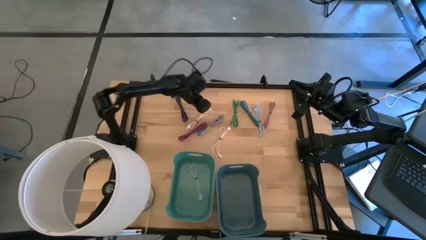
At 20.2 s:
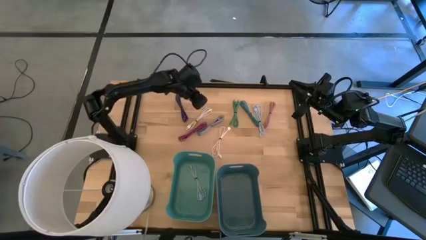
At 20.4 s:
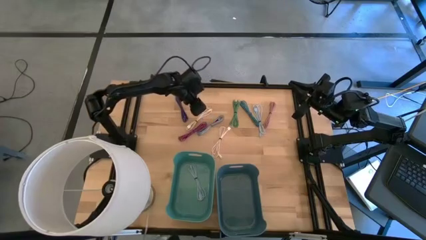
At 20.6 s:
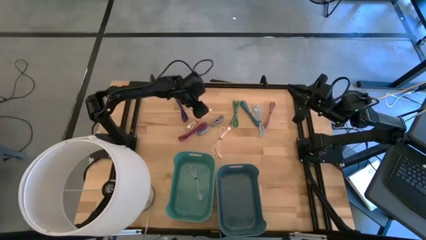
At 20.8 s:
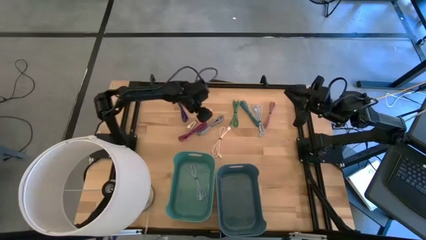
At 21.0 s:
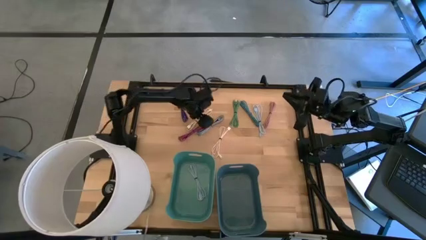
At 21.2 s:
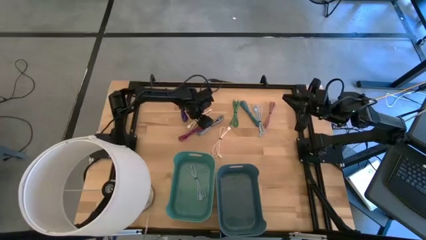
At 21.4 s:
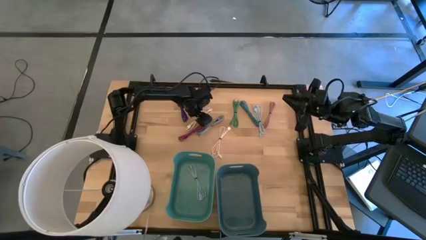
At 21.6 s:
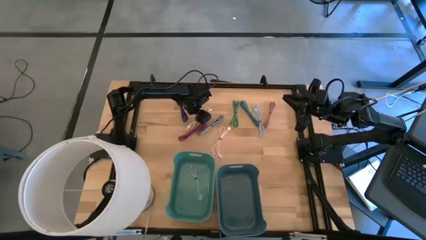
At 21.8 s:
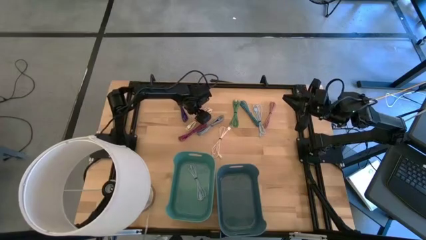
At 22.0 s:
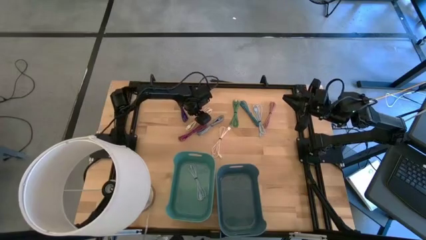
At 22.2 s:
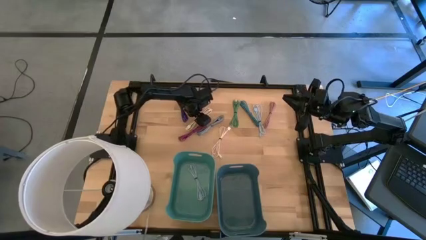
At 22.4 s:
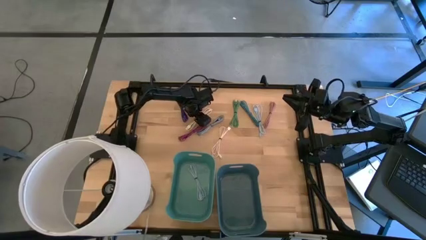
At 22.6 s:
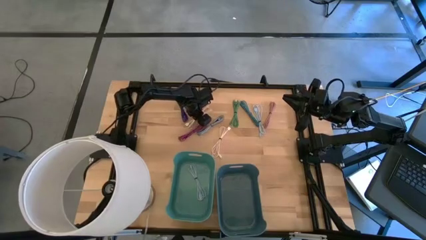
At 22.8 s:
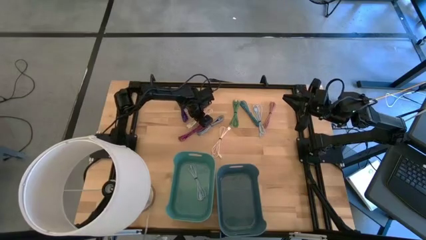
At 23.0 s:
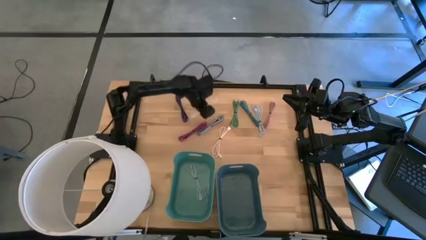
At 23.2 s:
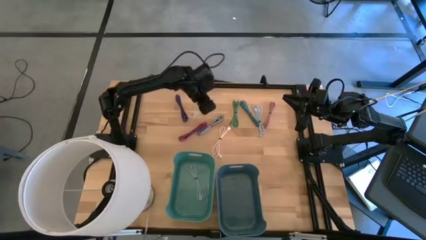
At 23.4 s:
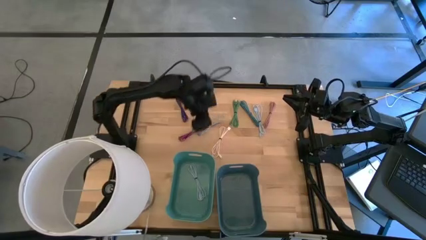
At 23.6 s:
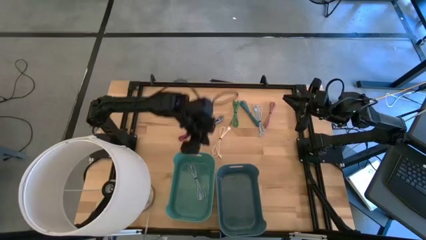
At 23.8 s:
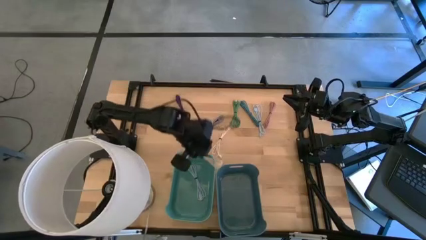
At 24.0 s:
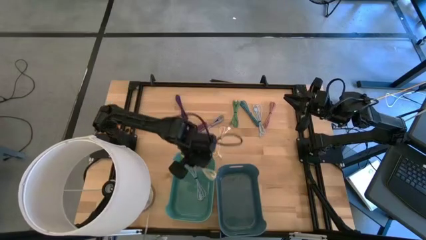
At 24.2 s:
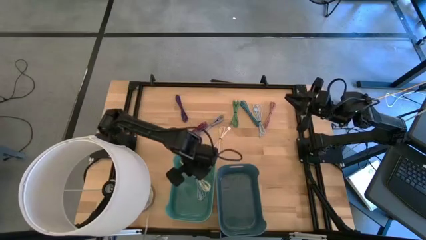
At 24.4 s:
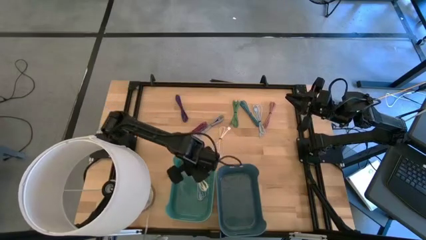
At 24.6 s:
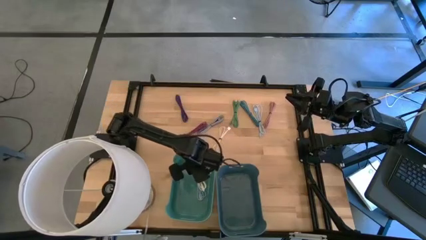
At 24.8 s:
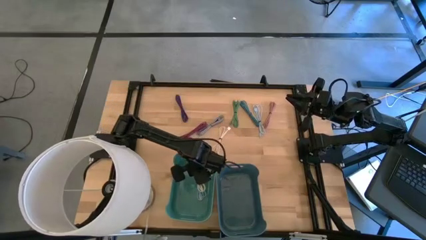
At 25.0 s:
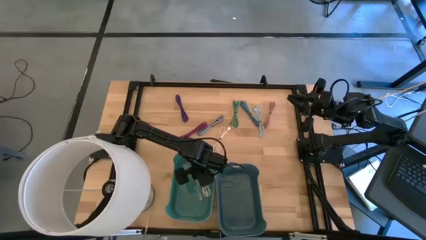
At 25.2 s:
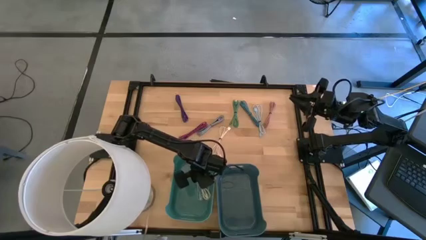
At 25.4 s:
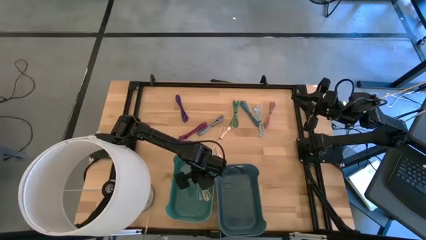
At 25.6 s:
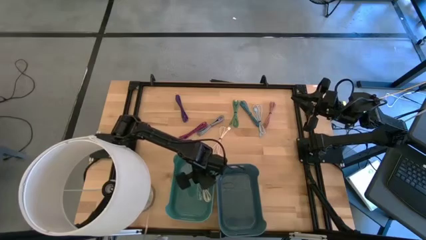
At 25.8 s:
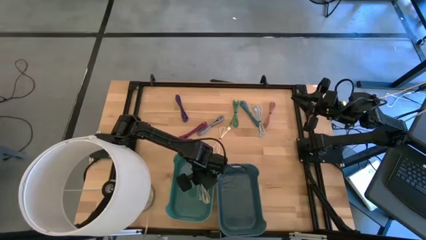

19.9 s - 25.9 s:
Put the left white charger cable into the green bin

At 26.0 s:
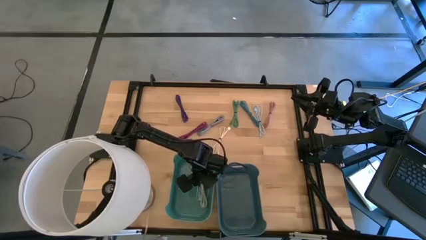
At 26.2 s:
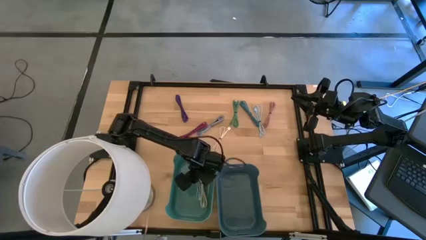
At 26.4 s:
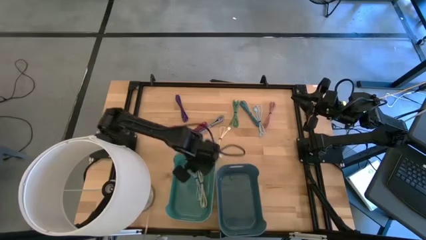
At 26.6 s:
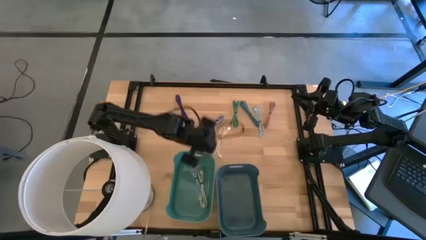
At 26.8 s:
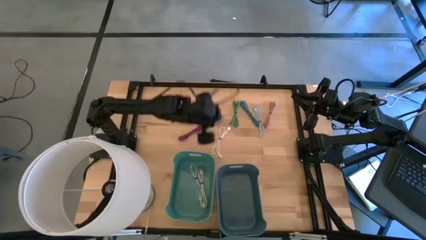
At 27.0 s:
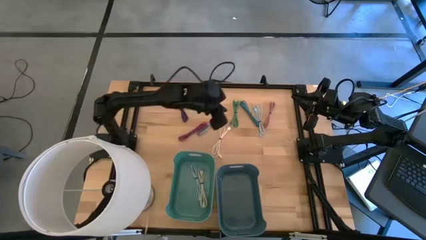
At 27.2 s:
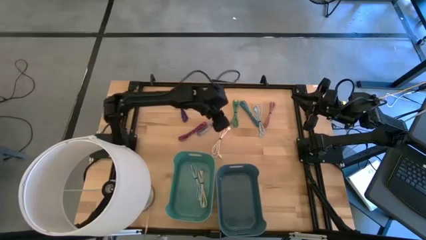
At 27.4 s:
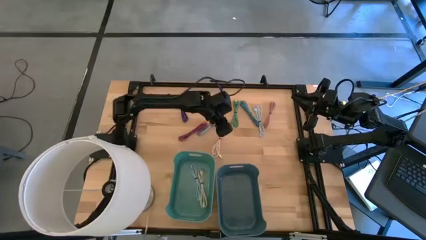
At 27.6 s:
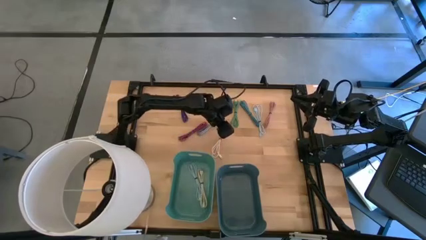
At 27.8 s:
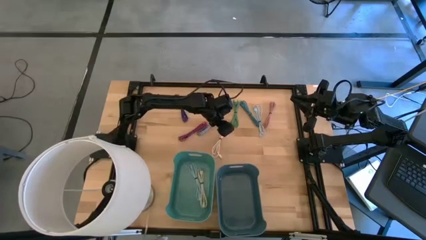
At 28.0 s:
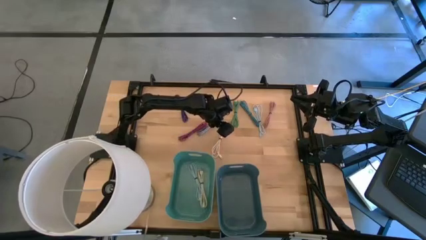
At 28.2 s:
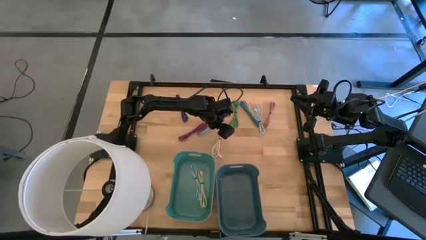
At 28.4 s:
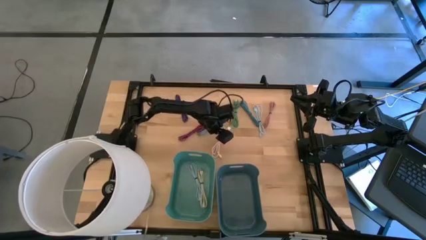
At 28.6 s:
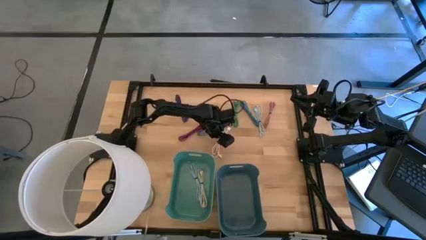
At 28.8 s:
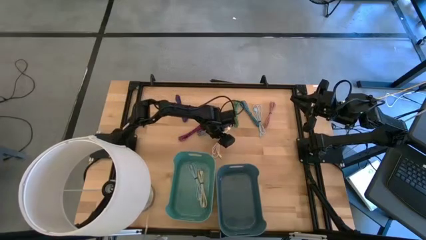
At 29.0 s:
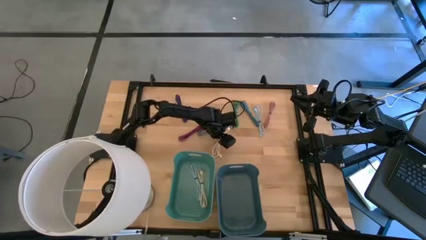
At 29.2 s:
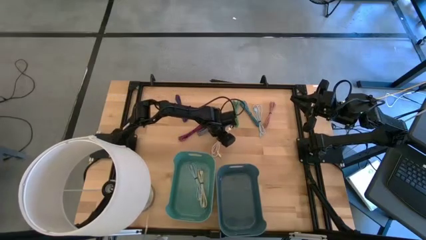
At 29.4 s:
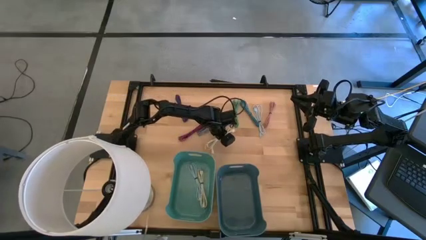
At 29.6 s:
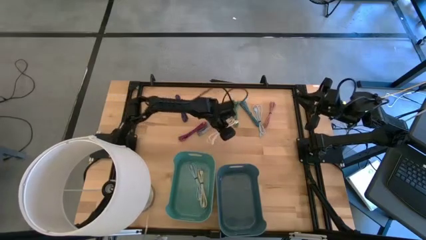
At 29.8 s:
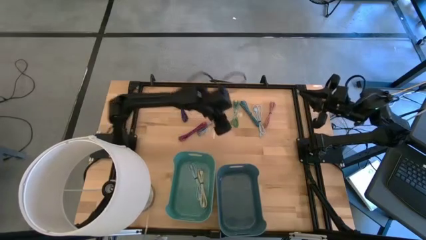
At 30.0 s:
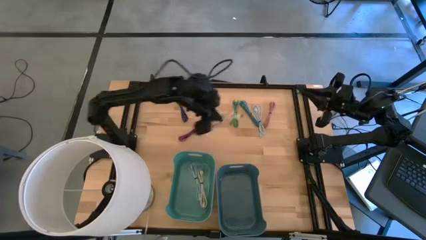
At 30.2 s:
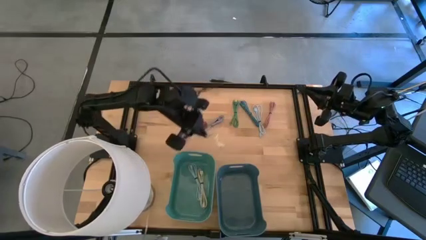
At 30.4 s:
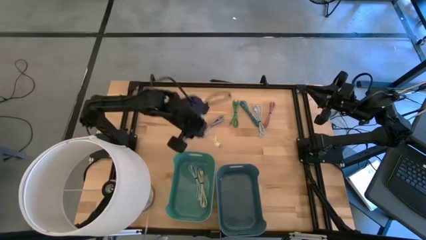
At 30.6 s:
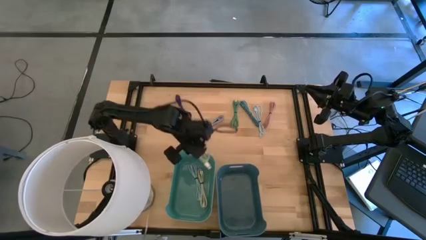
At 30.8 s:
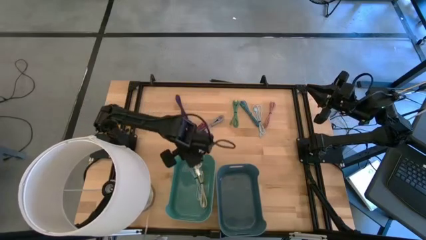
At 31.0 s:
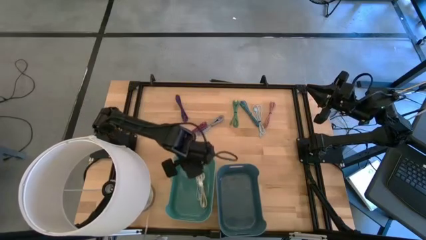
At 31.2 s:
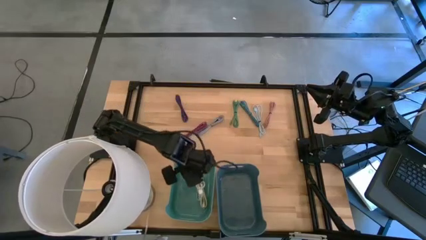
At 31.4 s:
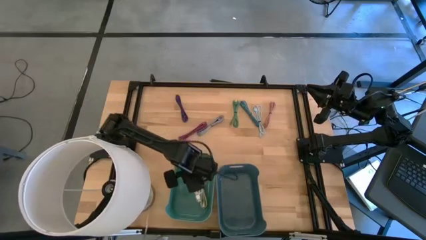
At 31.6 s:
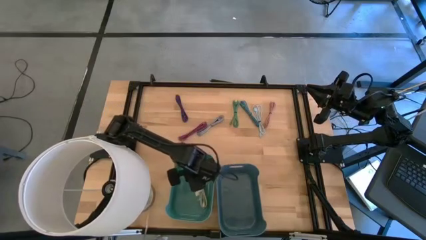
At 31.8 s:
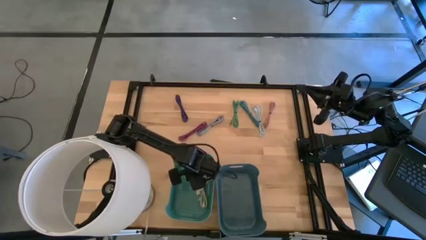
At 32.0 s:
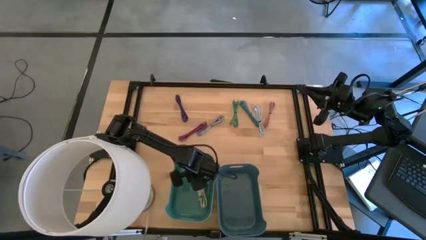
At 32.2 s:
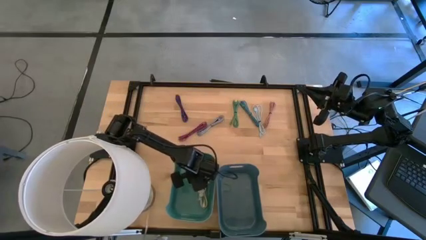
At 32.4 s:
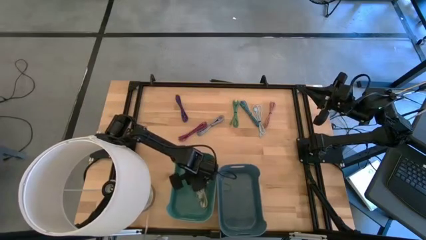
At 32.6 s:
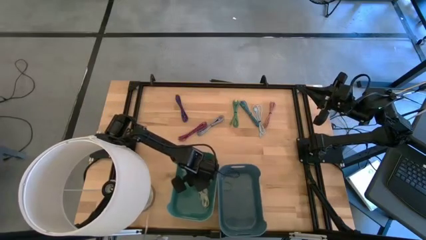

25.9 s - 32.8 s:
Put the white charger cable into the green bin
